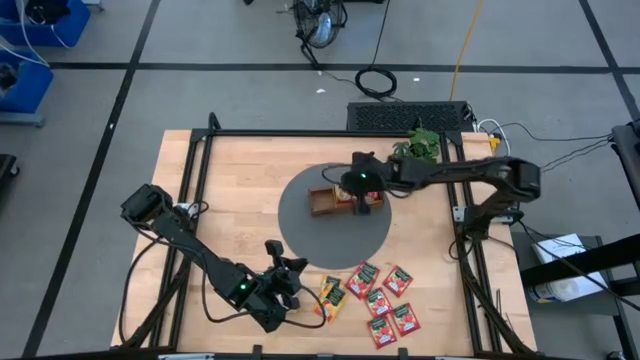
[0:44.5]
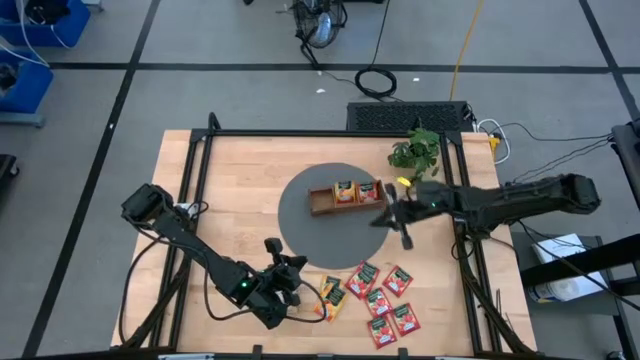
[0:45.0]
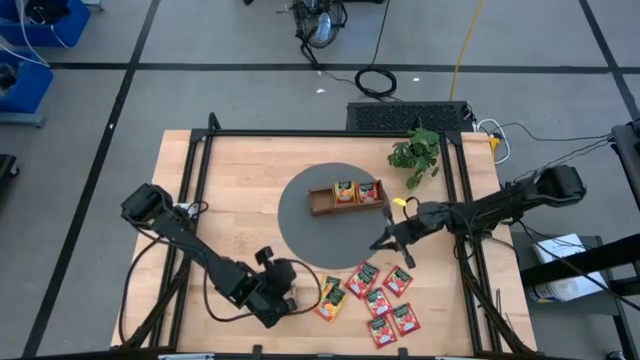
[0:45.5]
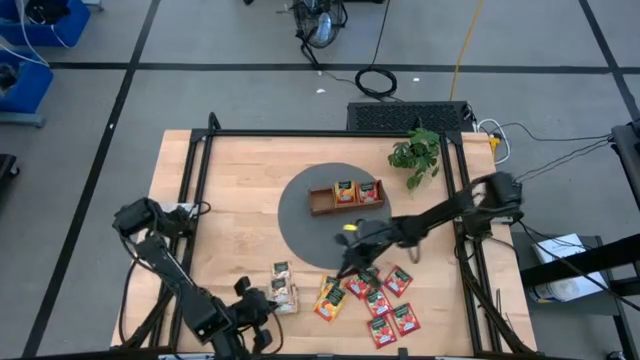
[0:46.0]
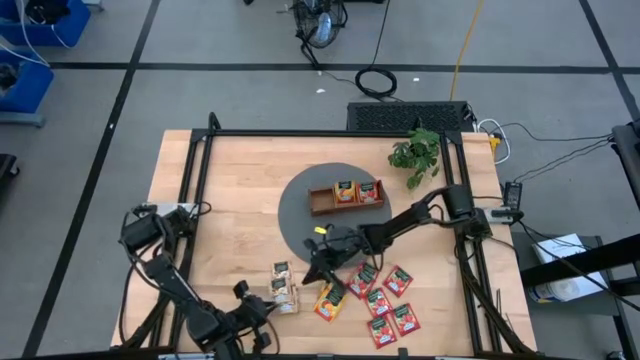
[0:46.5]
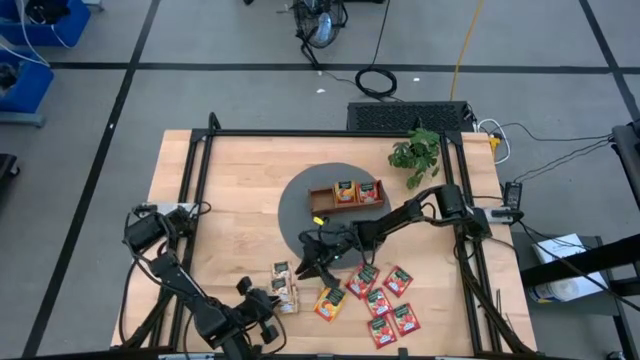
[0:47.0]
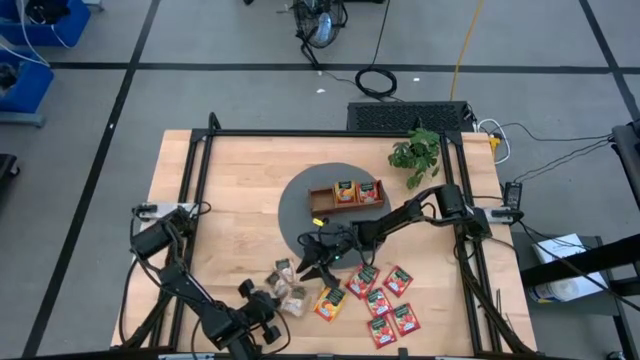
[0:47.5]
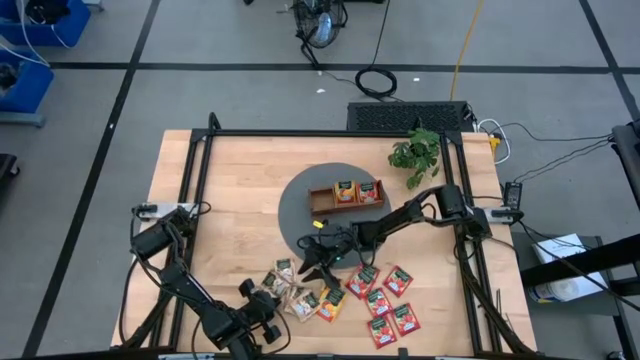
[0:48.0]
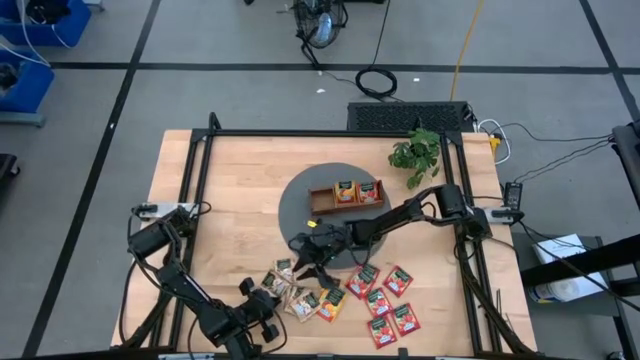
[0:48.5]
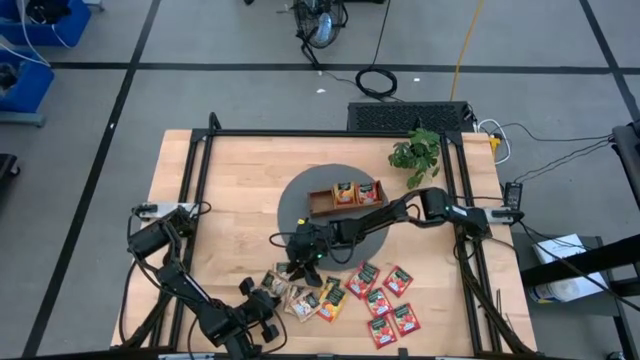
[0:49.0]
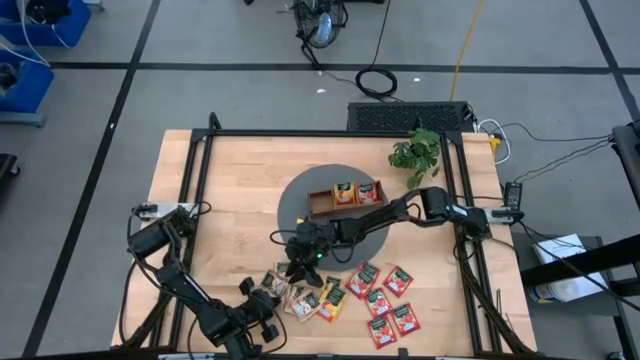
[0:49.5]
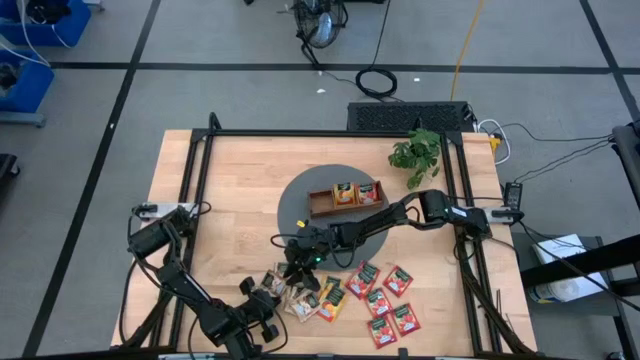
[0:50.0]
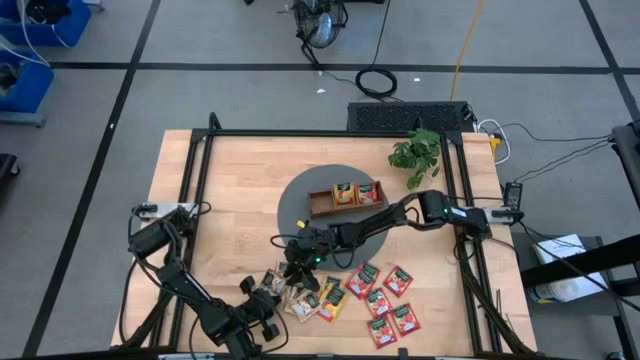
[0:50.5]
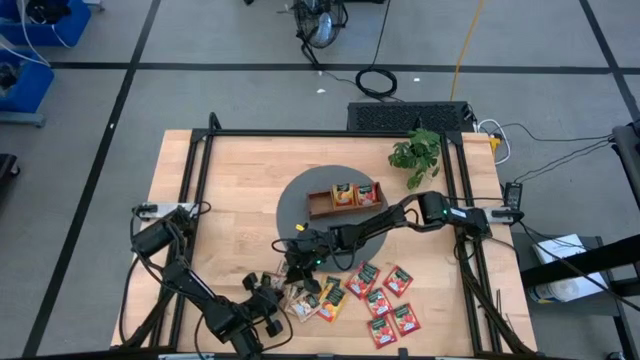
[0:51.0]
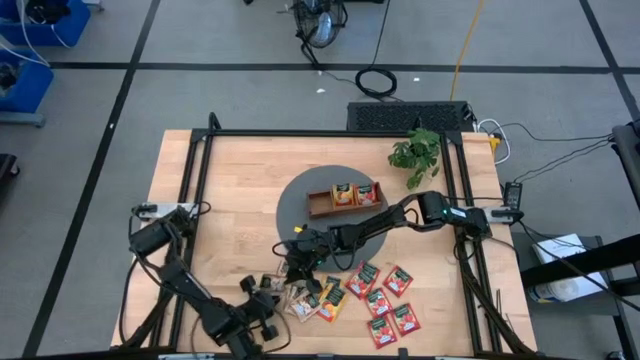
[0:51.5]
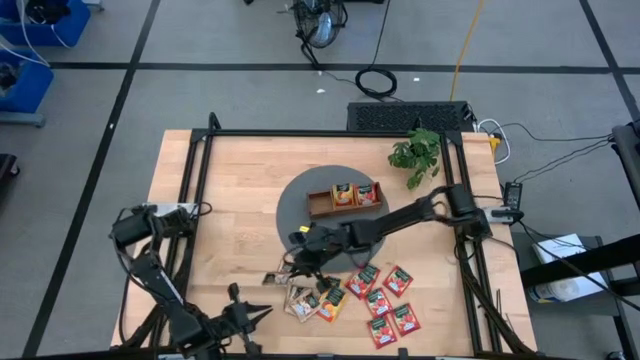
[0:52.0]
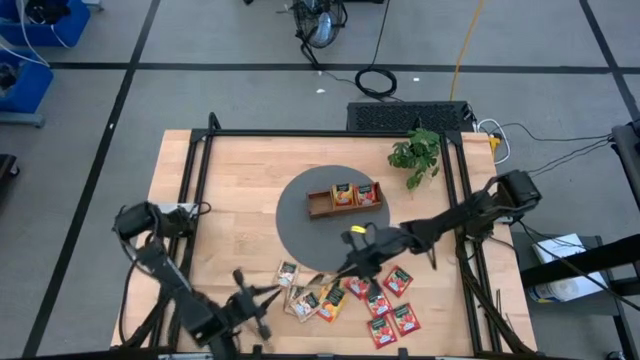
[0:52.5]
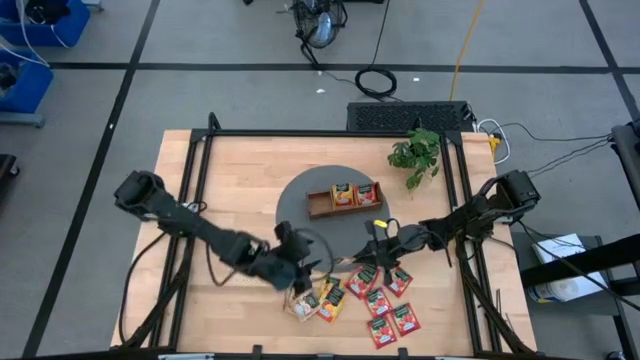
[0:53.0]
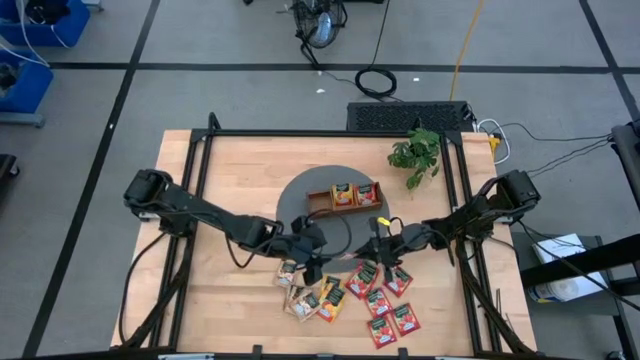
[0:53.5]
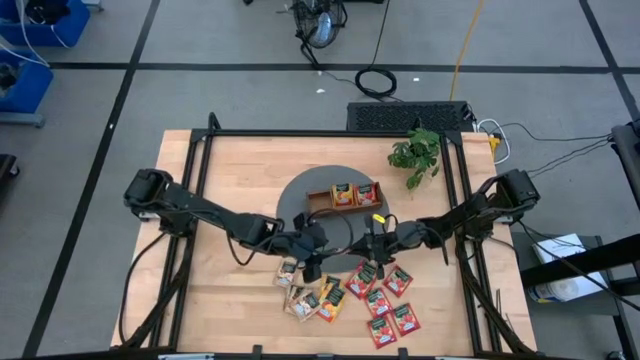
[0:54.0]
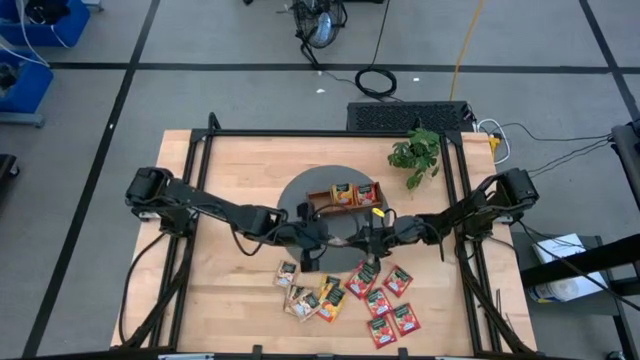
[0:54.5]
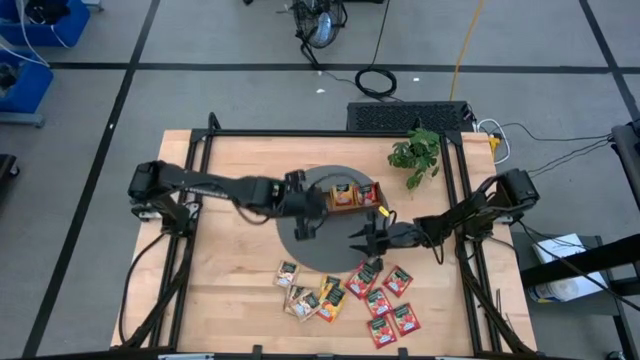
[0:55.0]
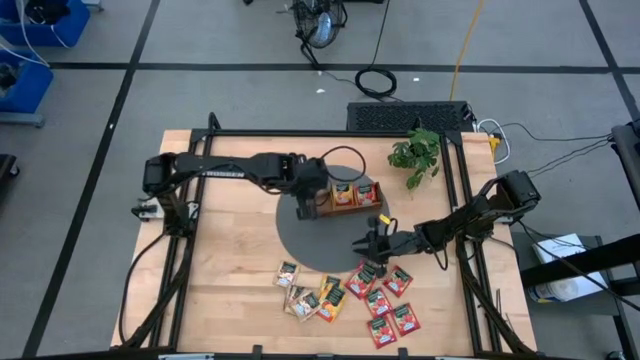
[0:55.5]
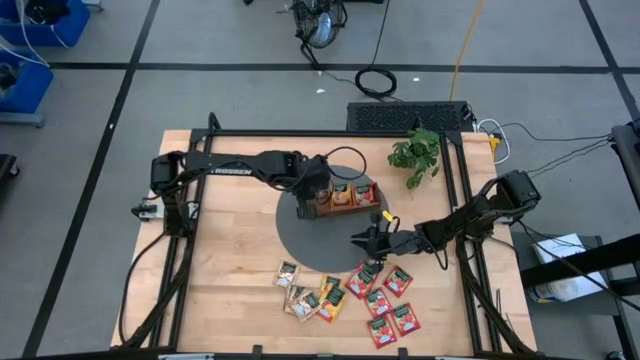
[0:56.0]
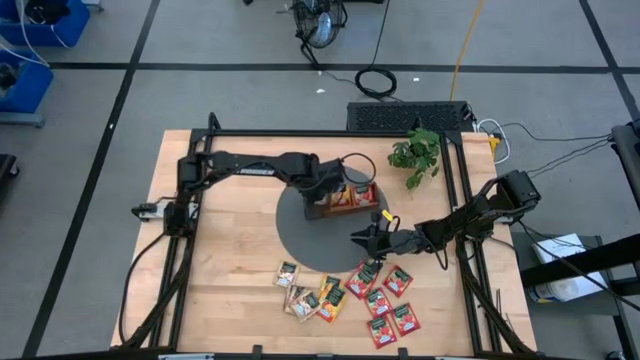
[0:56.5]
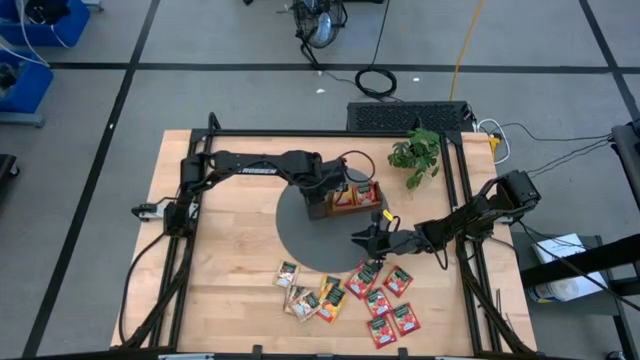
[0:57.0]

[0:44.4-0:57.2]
Task: Pick & Place Tea
Put the gold tea bag into the left compartment of the wooden organizer

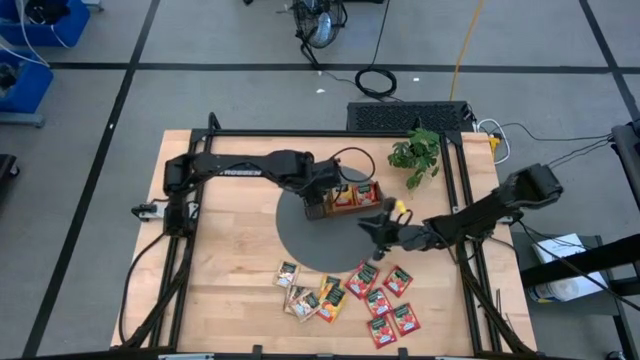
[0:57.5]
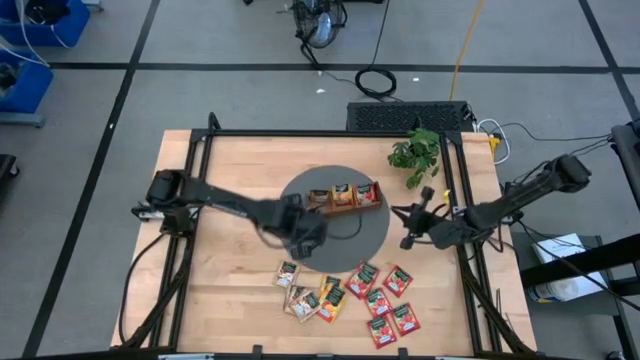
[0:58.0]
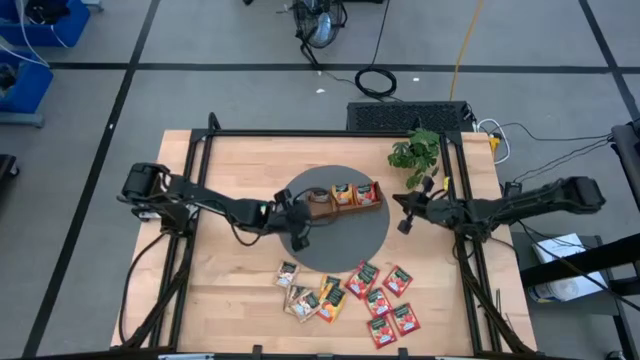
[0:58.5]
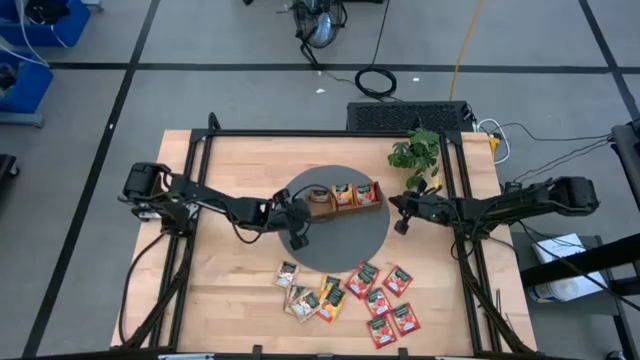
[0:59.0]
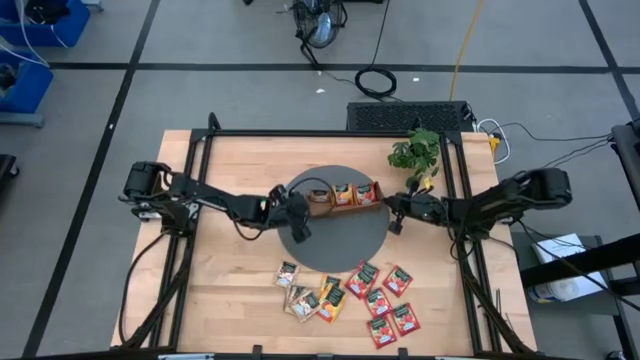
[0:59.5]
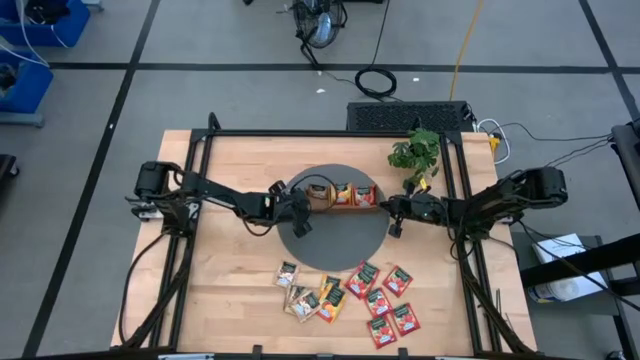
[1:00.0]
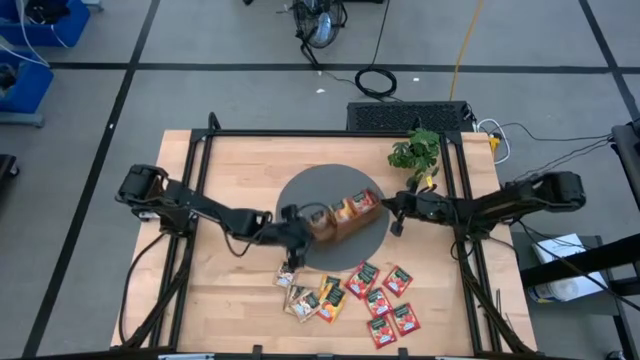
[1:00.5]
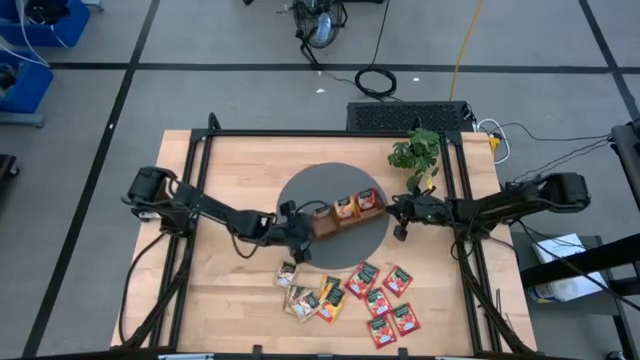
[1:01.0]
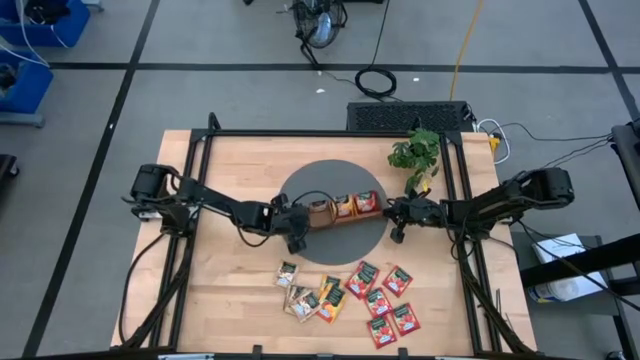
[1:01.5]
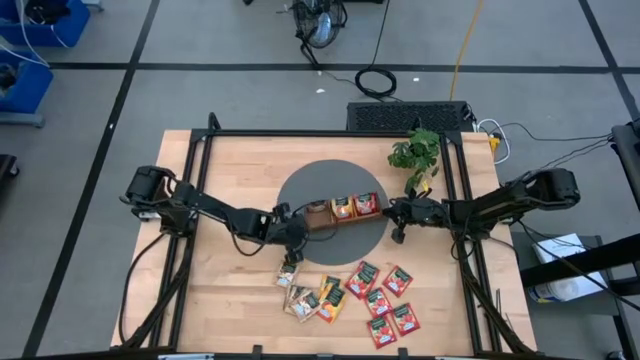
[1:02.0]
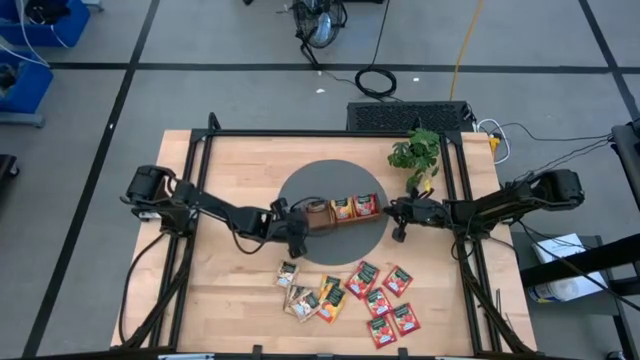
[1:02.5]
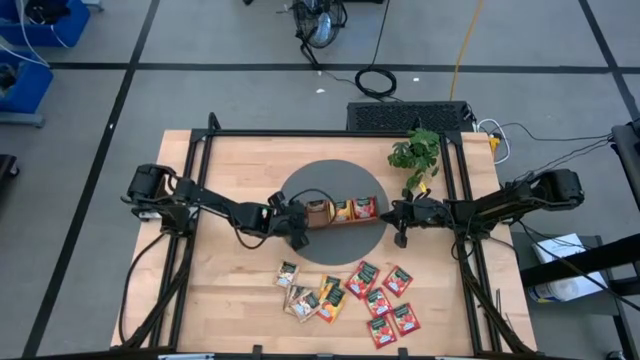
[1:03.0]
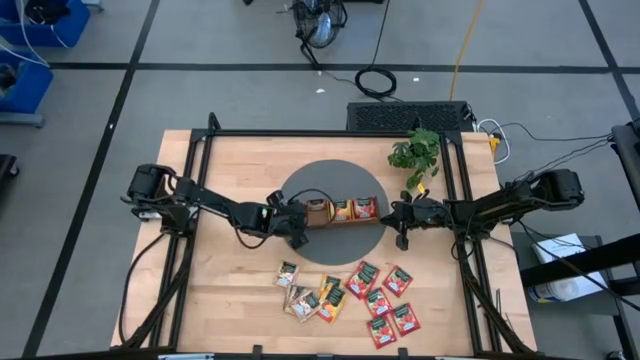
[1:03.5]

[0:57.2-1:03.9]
Adjust the wooden organizer

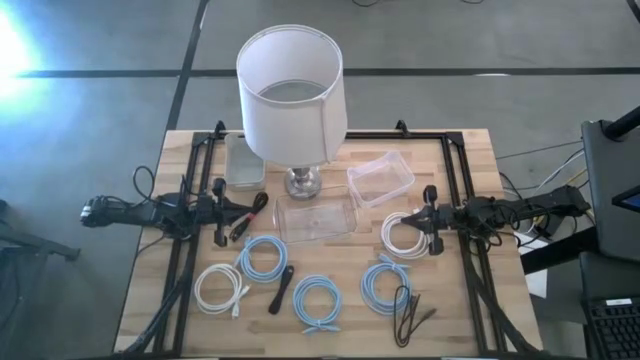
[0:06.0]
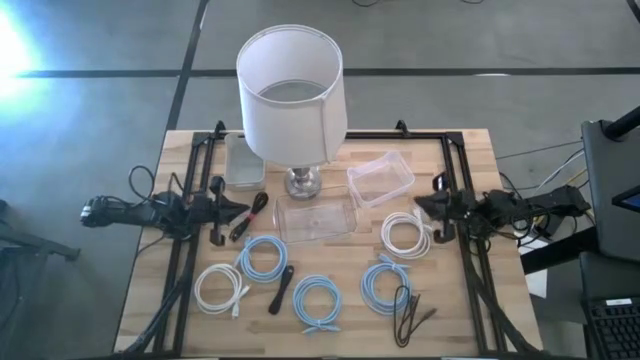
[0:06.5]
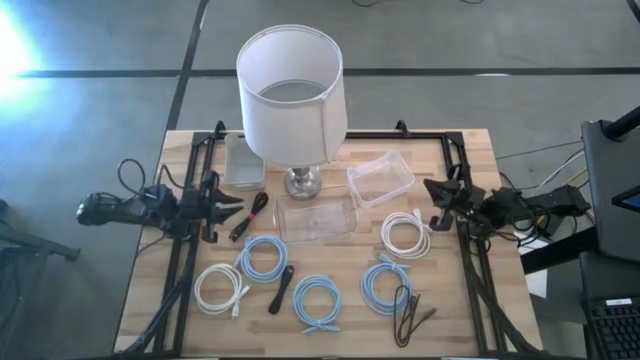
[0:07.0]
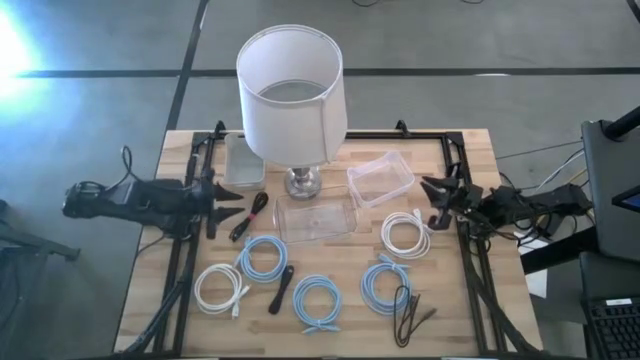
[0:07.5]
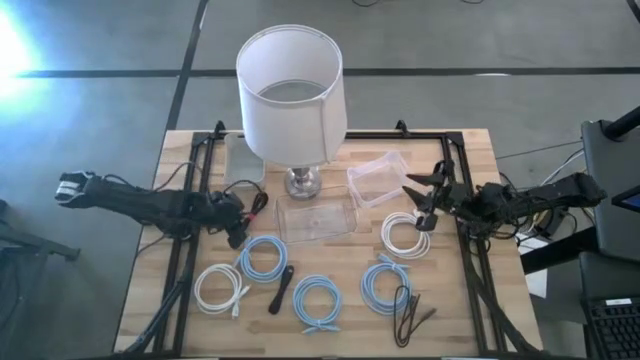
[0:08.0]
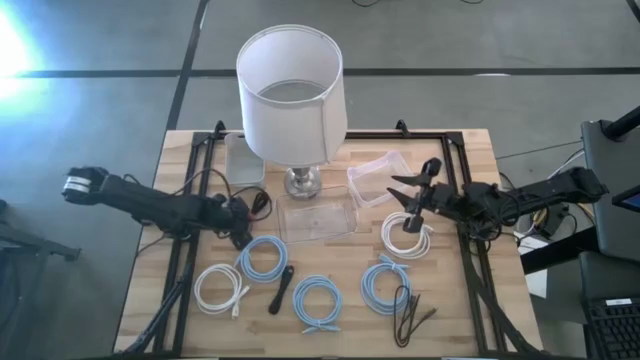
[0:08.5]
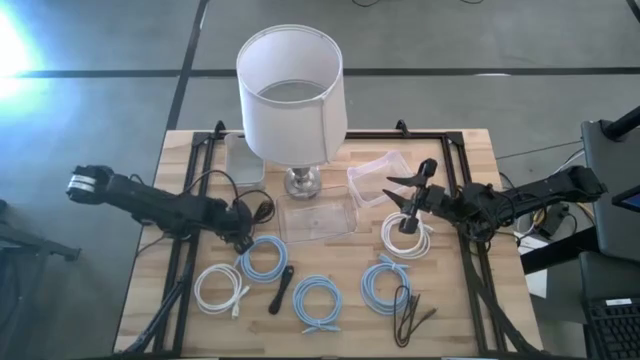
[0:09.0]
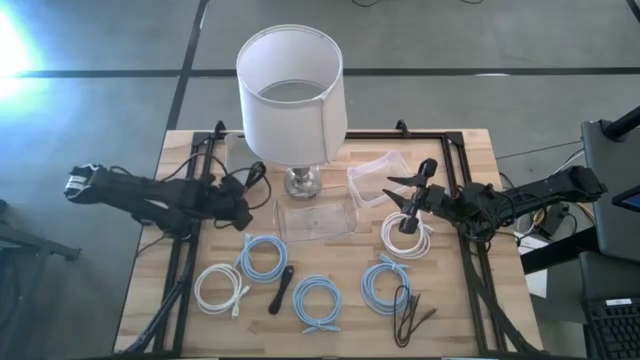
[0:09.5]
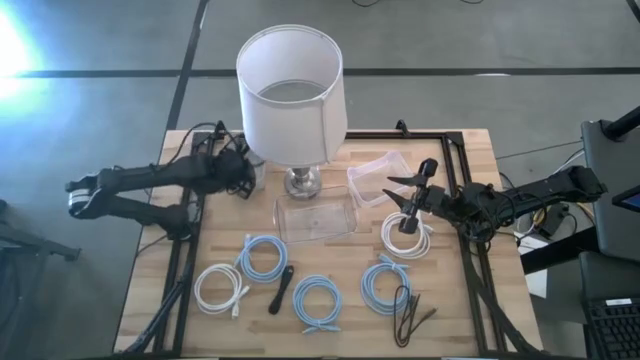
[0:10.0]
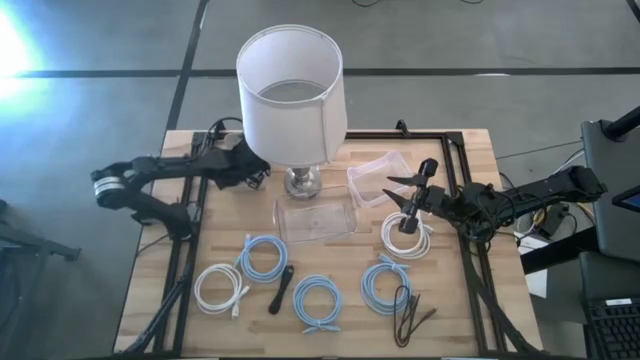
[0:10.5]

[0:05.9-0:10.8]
Task: Pick & Place USB Port
Put the top black usb cable into the gray bin
